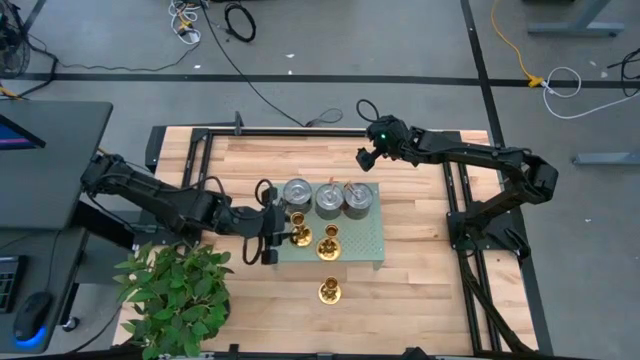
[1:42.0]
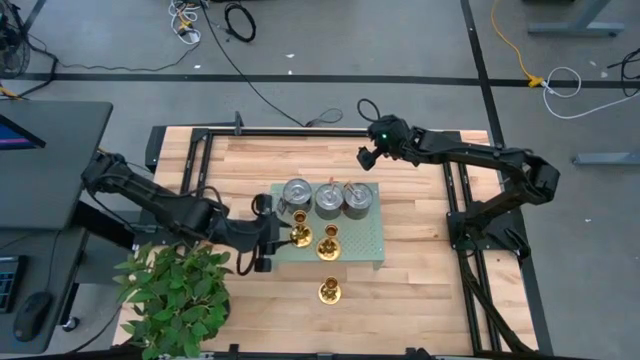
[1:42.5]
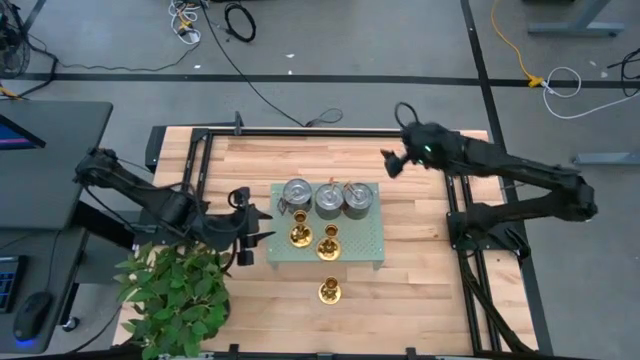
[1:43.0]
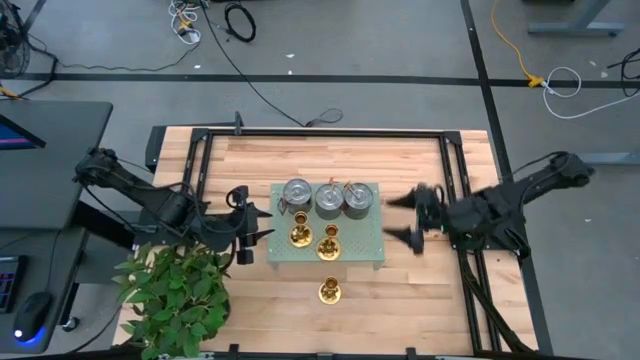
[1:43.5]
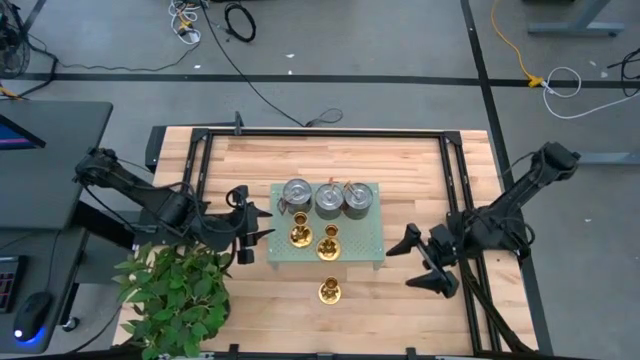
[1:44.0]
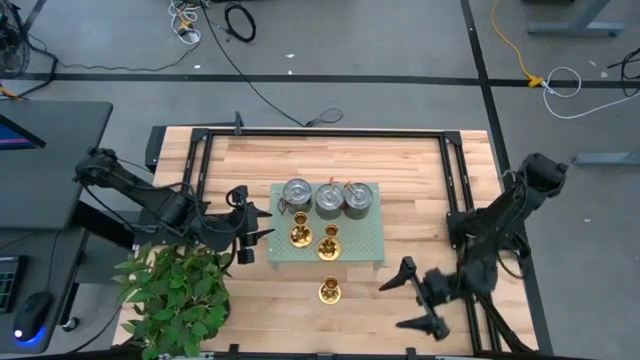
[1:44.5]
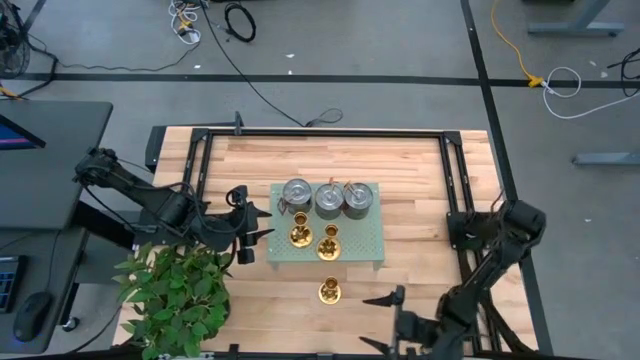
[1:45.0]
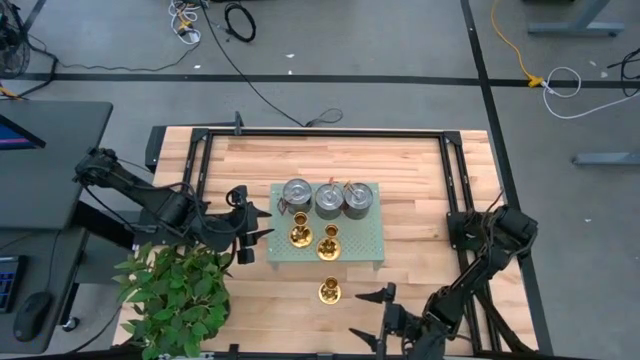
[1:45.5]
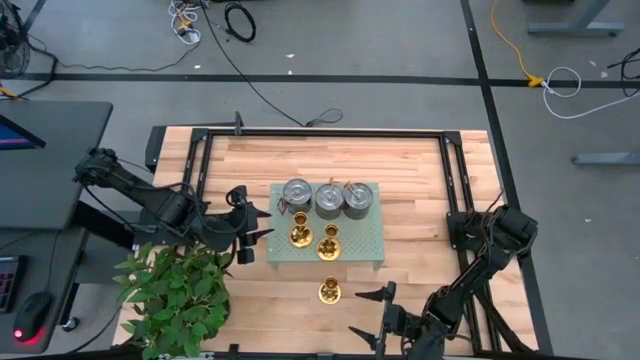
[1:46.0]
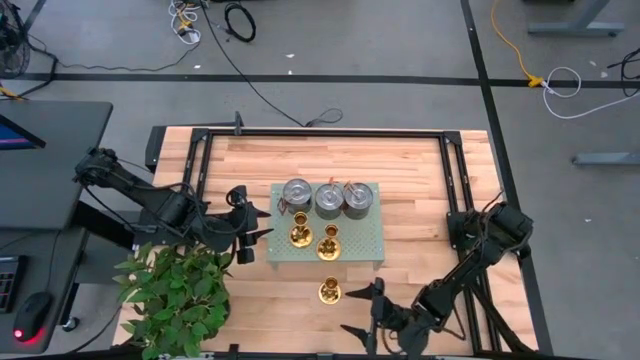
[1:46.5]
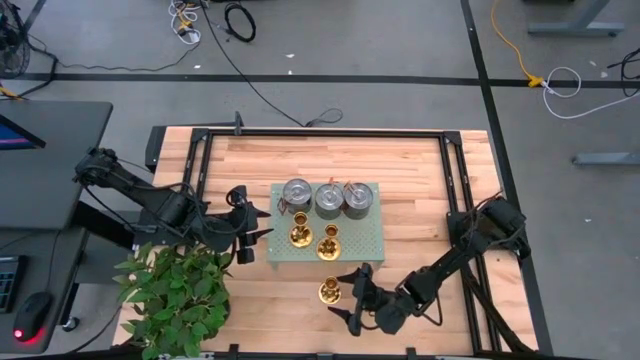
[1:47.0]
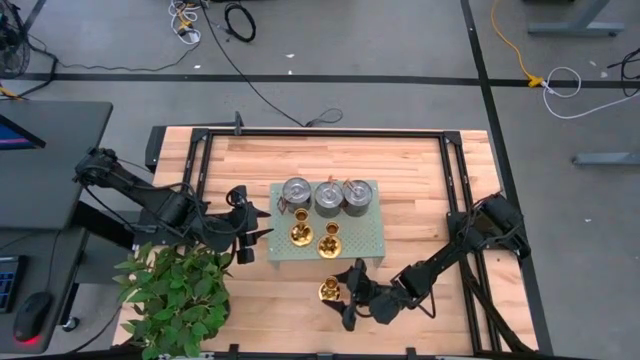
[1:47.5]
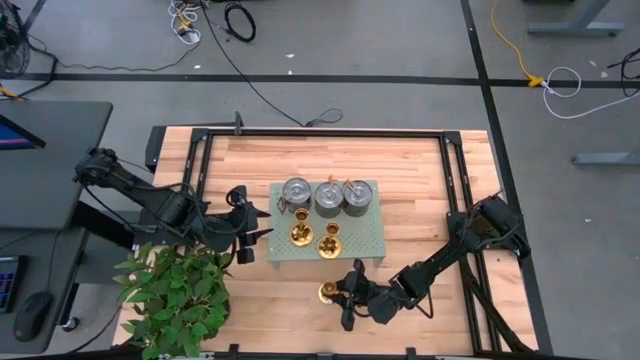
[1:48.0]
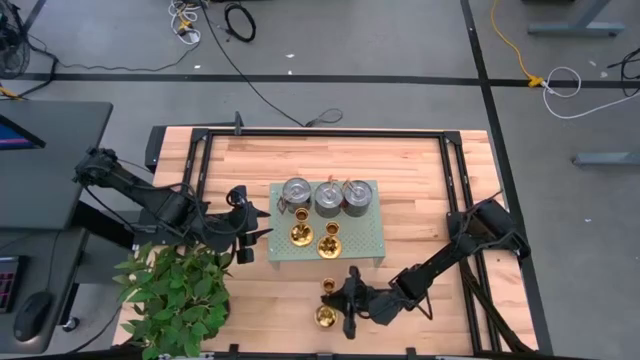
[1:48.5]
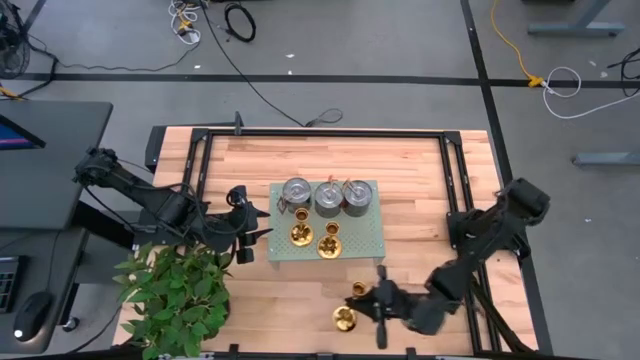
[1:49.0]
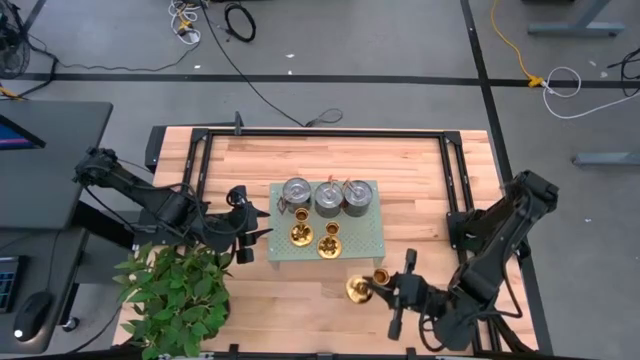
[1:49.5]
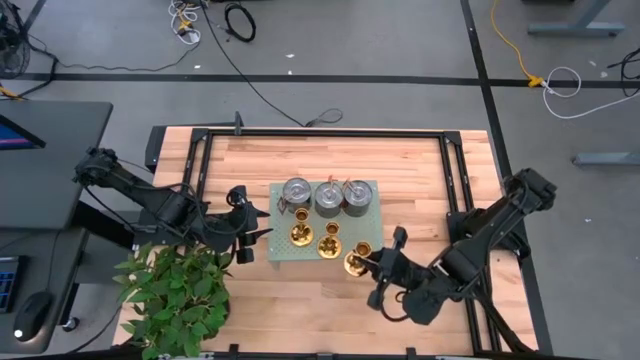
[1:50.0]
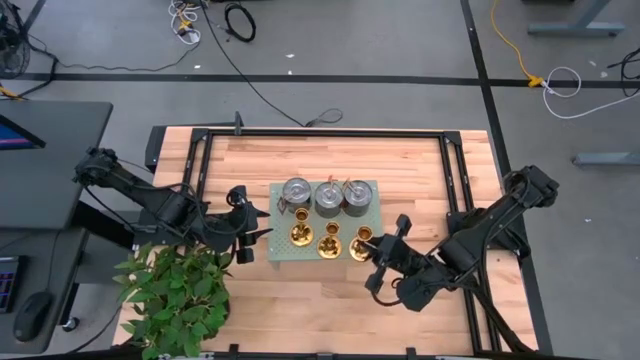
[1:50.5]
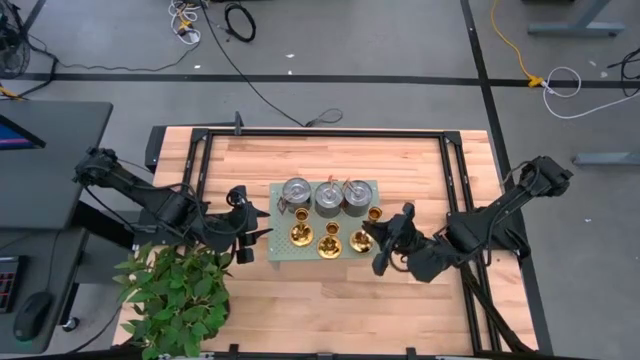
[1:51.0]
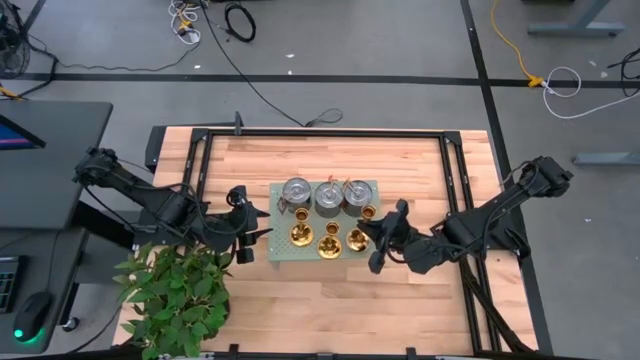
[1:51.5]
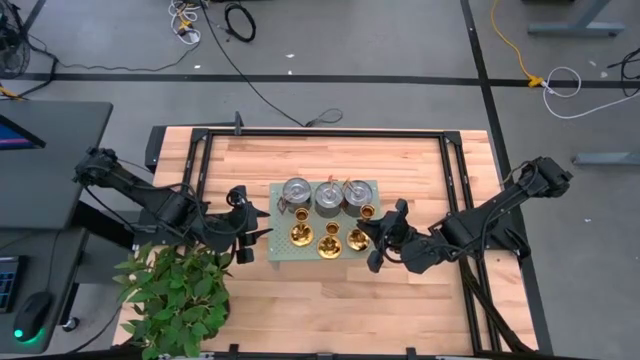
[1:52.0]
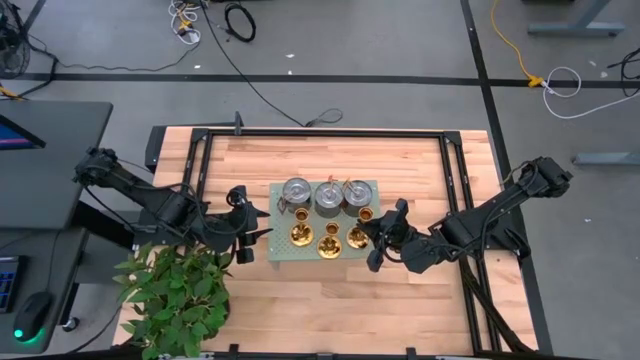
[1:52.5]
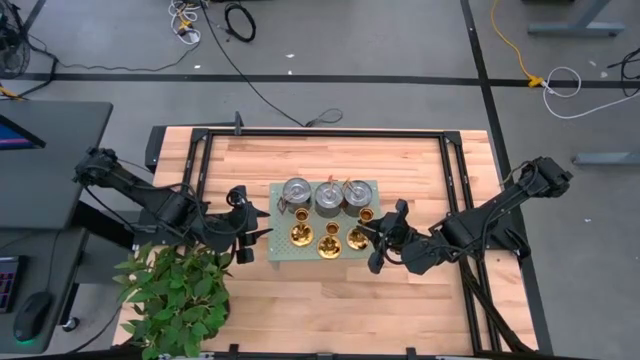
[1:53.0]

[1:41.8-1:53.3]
Task: Pick & Place candle stick holders
Put the top golden candle holder on the shelf aligned with the left orange scented candle

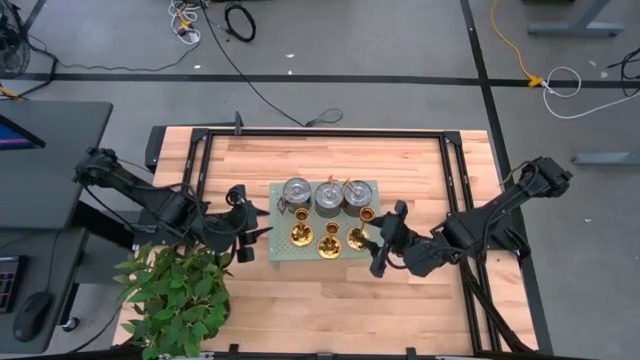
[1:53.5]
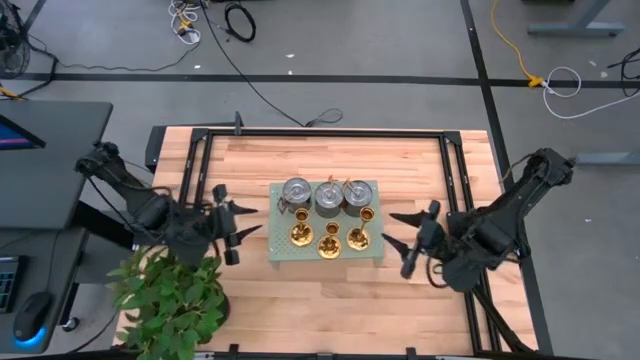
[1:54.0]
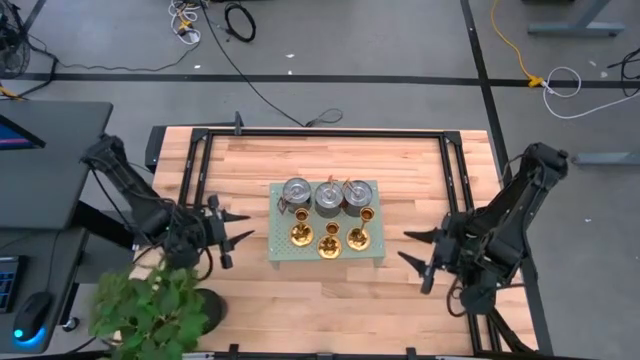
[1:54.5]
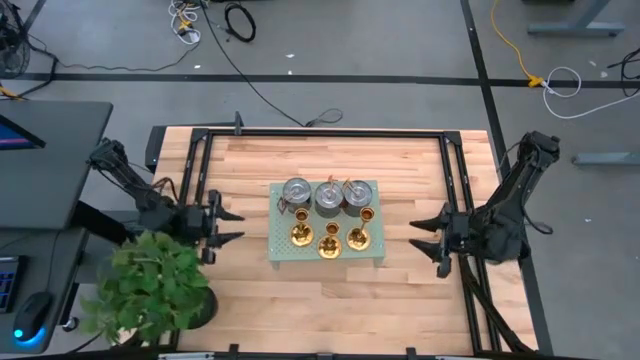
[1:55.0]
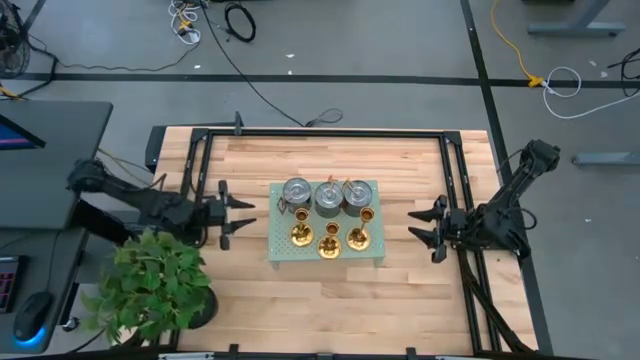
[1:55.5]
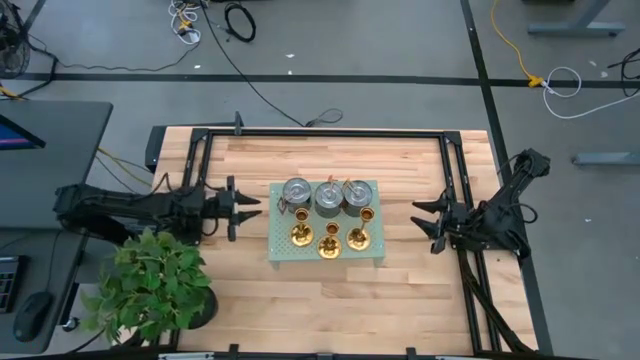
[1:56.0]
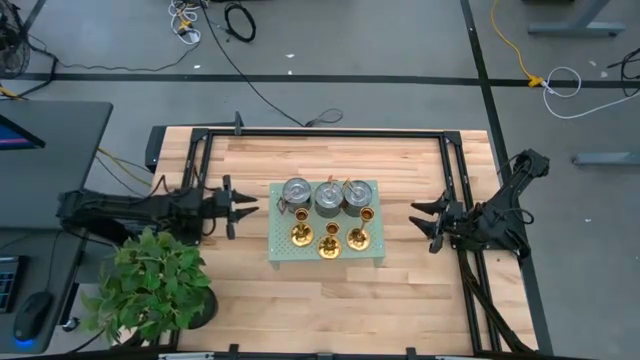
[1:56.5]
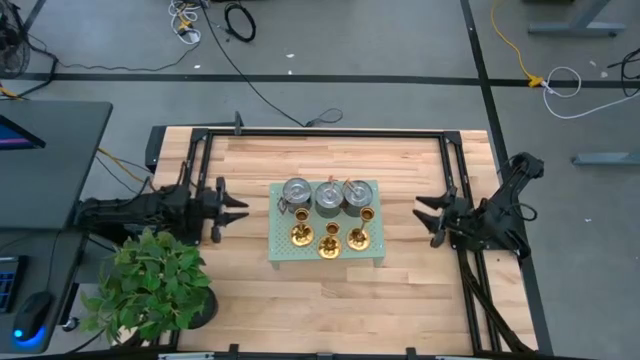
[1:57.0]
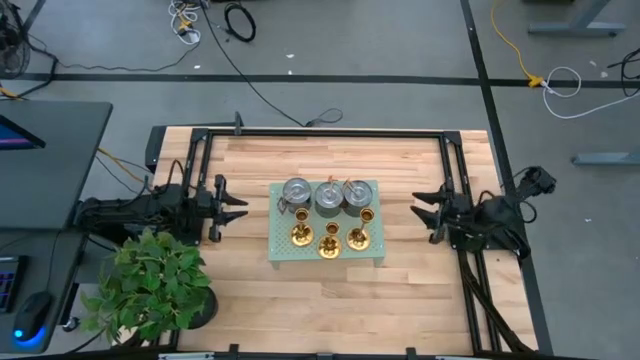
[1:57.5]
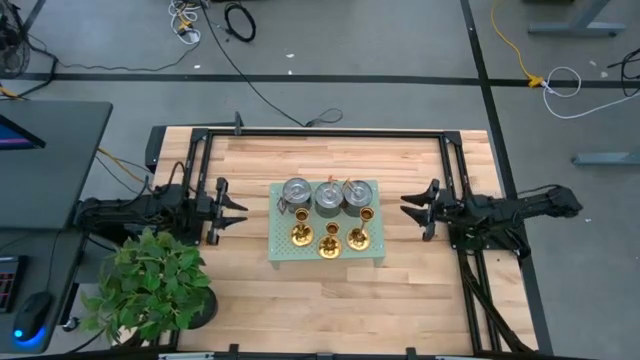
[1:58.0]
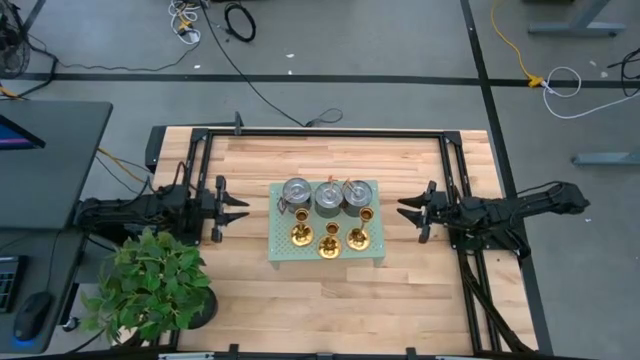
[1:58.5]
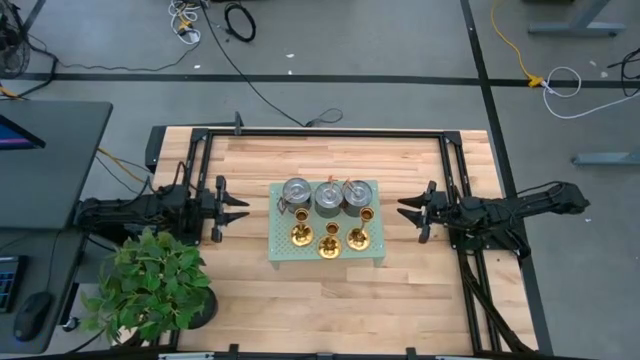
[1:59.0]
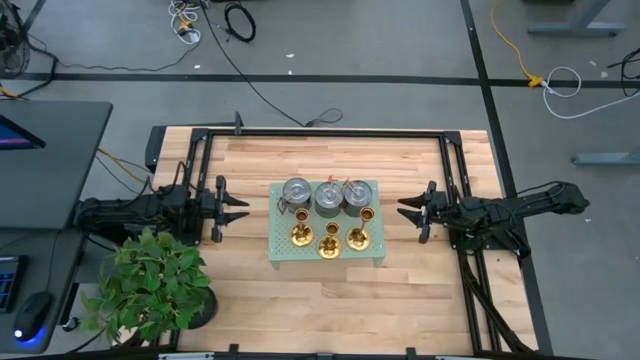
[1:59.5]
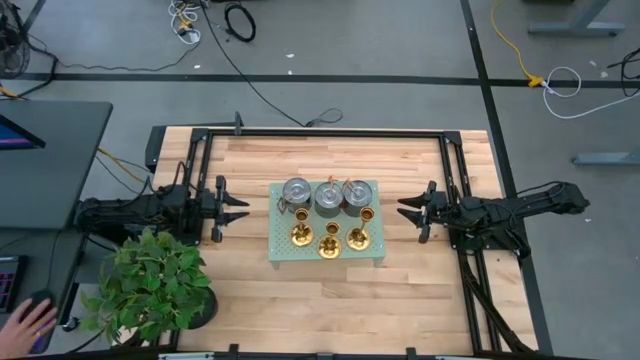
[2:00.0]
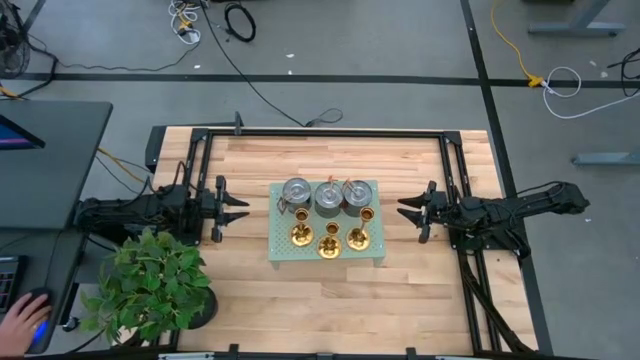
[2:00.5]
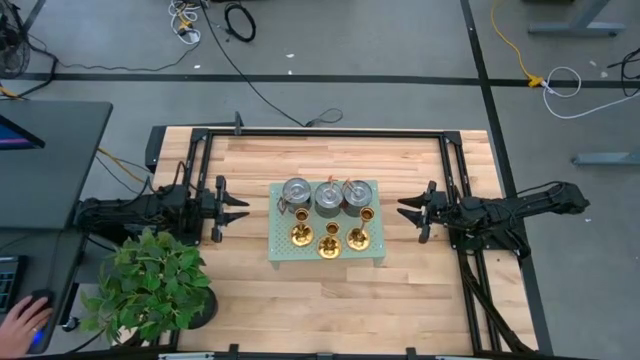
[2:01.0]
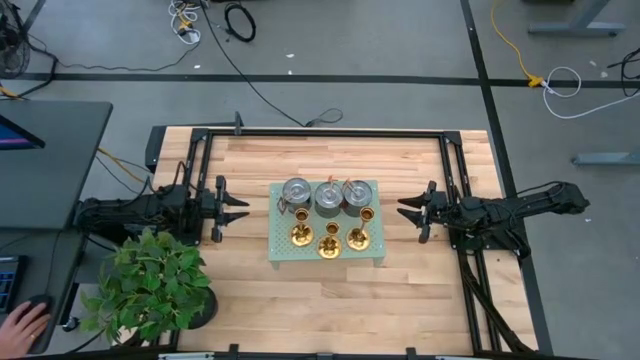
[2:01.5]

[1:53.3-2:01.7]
Return to Home Position
